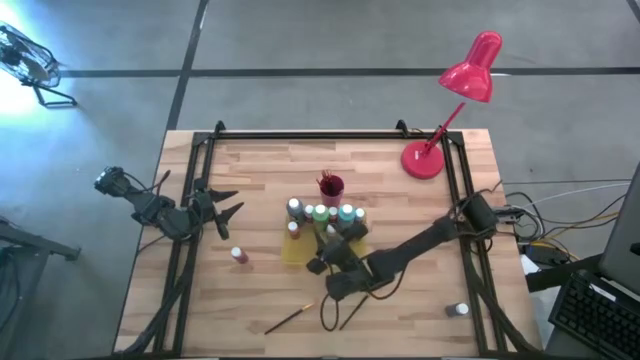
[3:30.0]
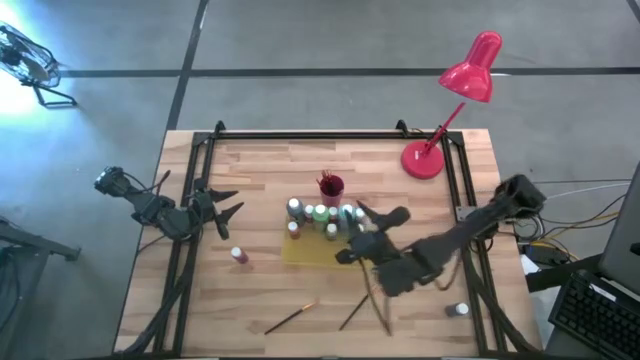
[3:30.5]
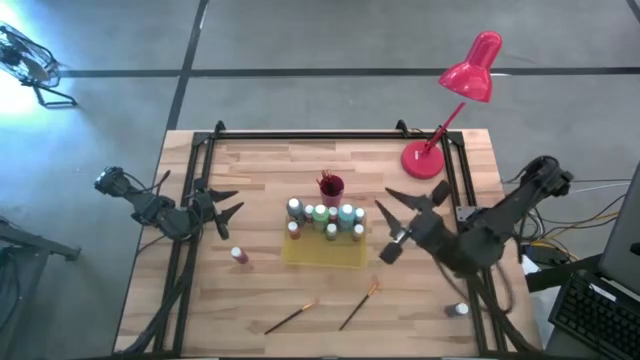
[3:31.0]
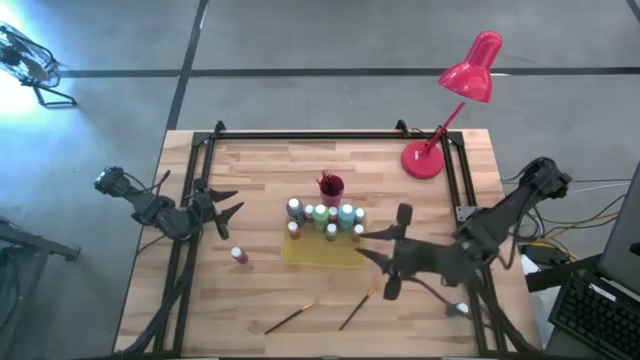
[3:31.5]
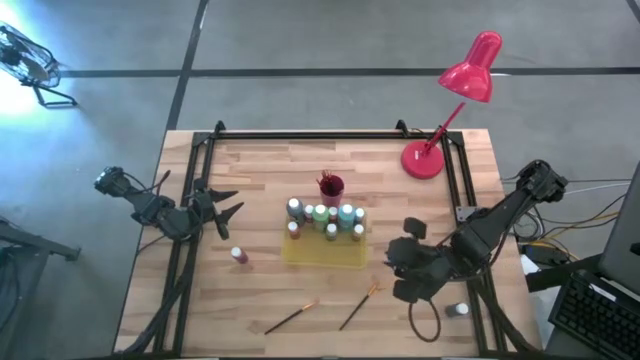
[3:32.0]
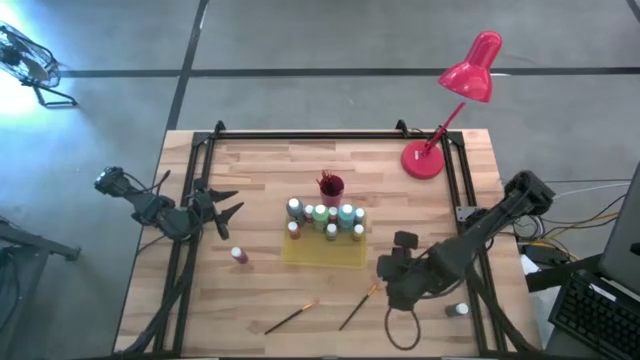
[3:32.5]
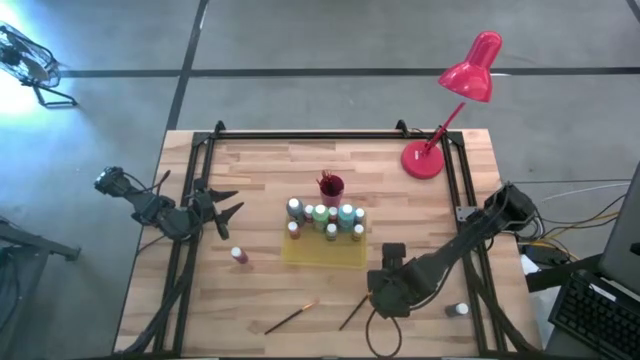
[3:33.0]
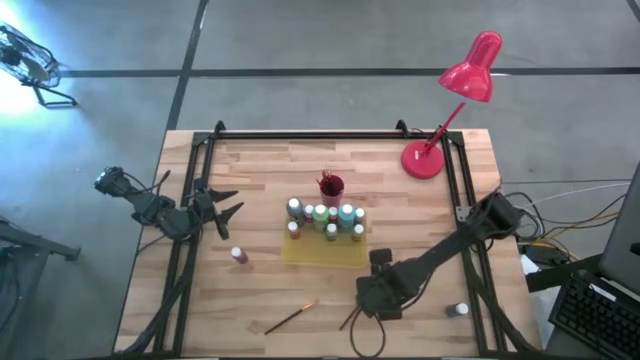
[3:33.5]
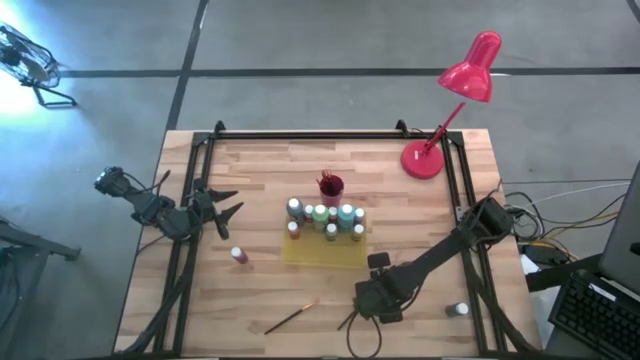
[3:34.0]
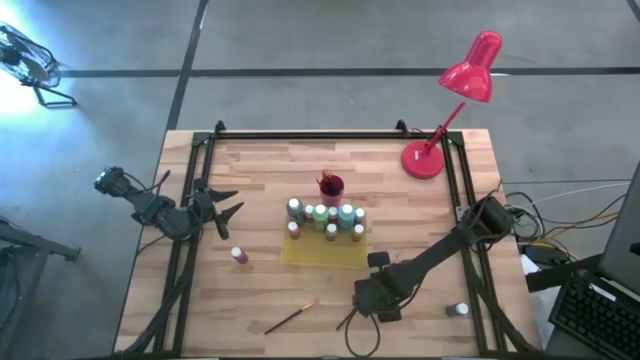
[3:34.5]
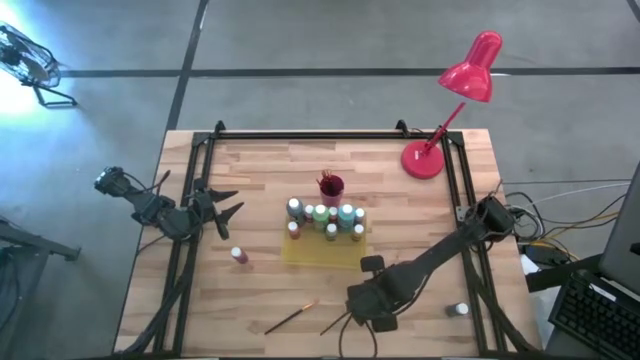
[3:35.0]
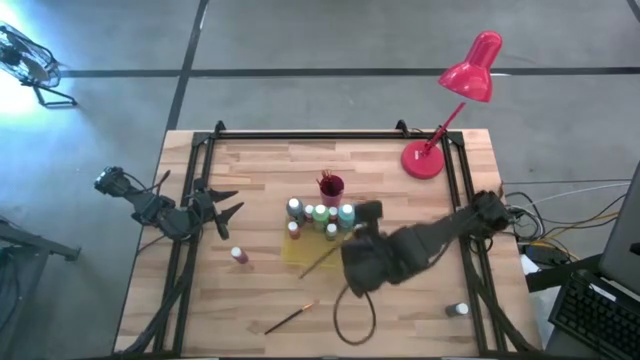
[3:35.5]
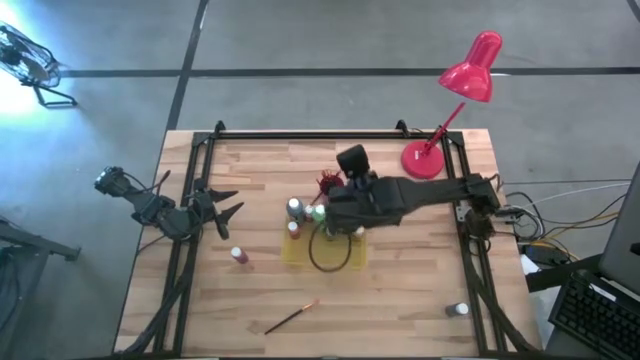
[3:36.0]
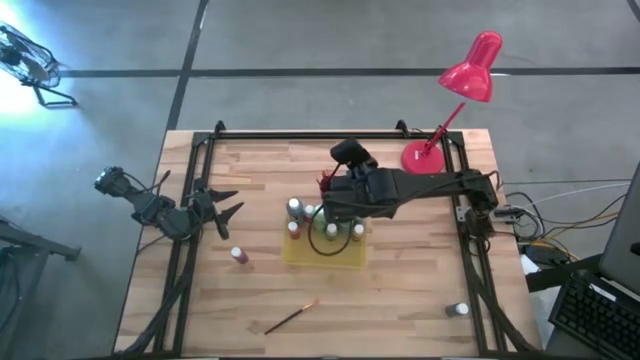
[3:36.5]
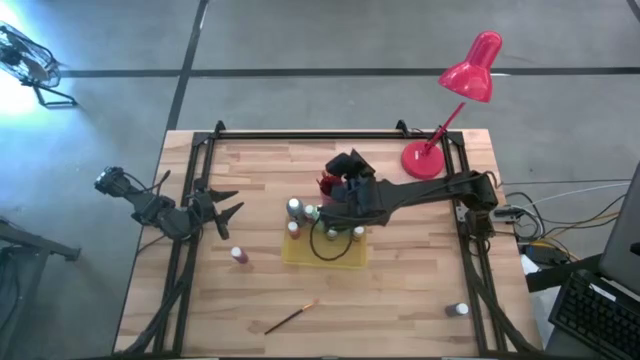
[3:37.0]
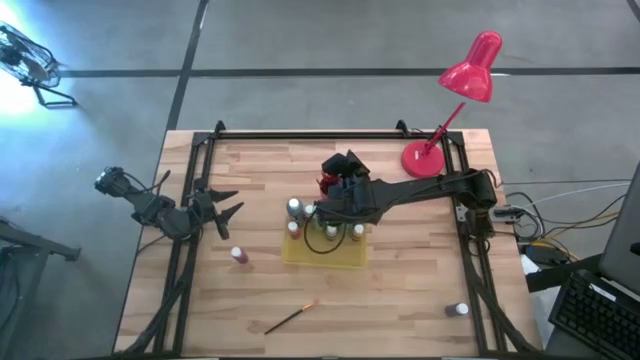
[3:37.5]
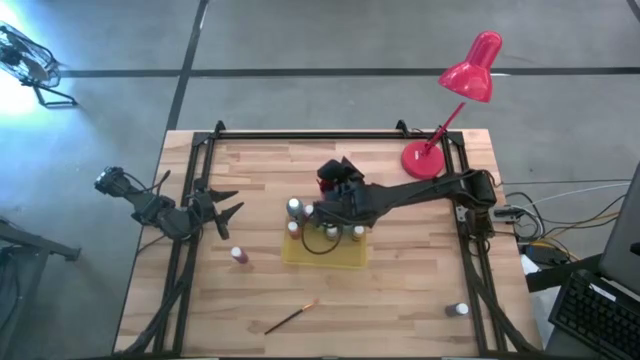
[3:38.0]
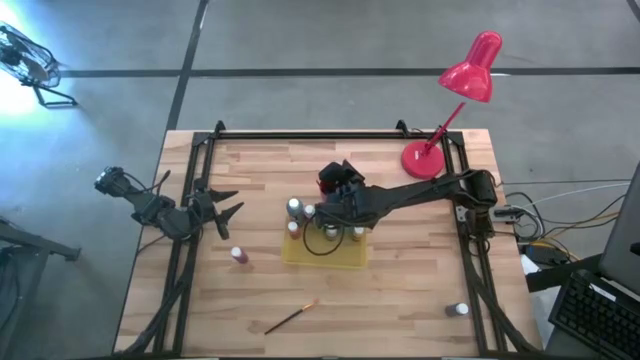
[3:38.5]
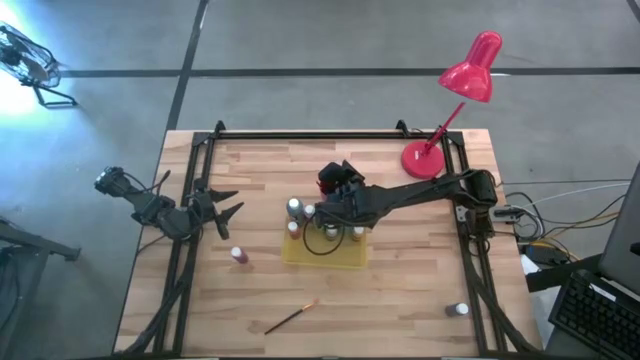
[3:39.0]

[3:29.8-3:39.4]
Task: Pick & Place Paint Supplies
Put the gold paint brush into the pink cup

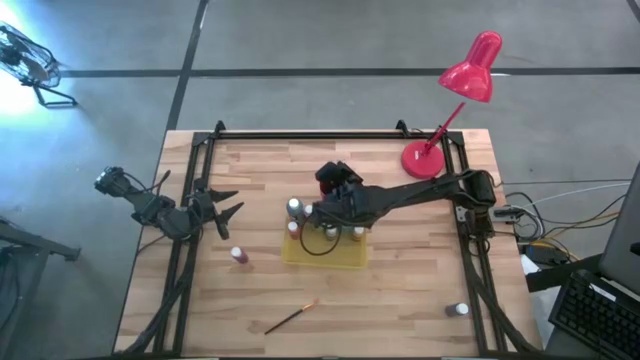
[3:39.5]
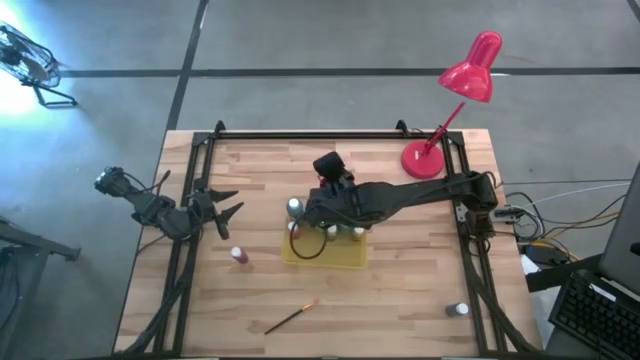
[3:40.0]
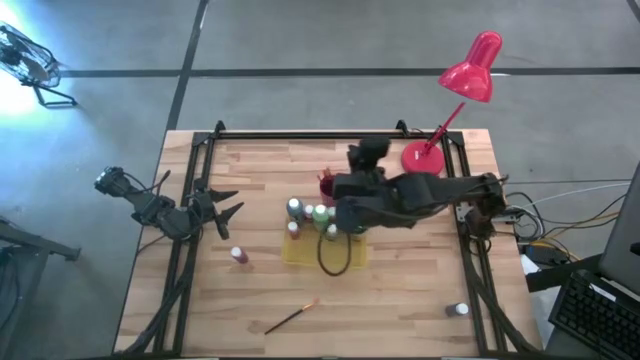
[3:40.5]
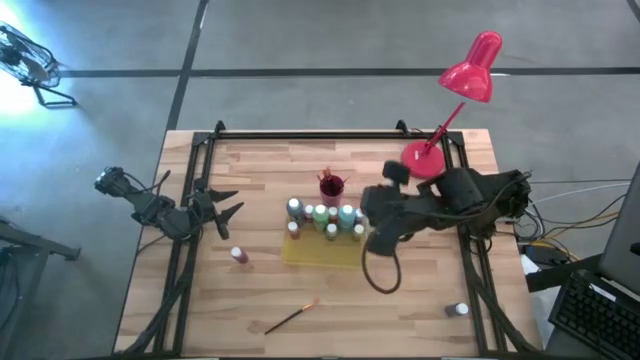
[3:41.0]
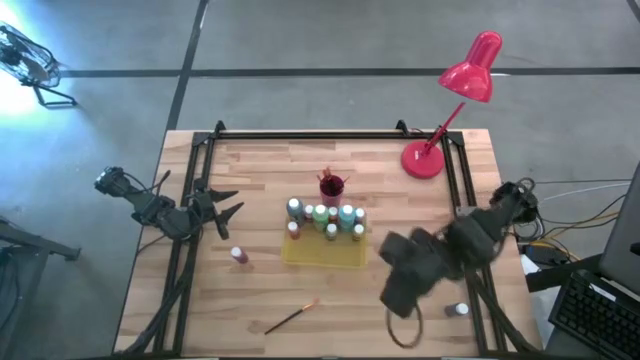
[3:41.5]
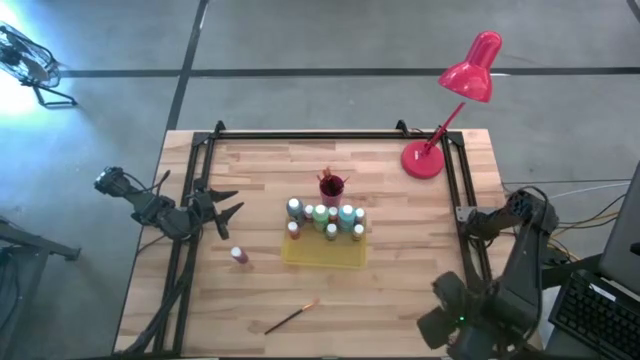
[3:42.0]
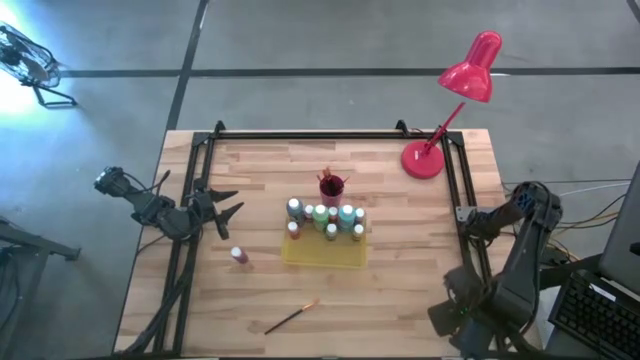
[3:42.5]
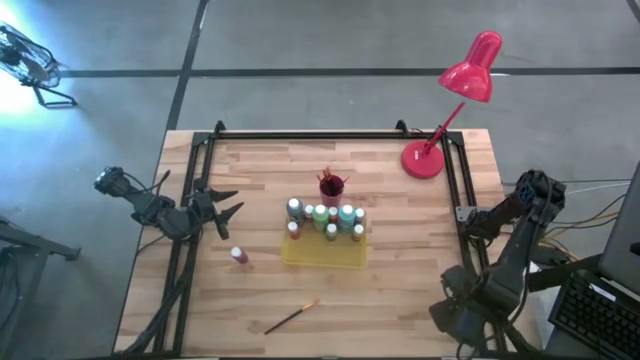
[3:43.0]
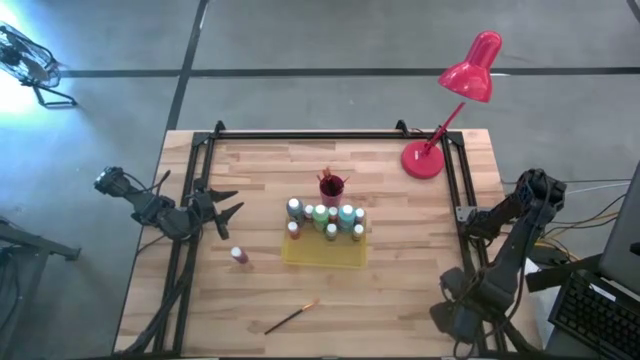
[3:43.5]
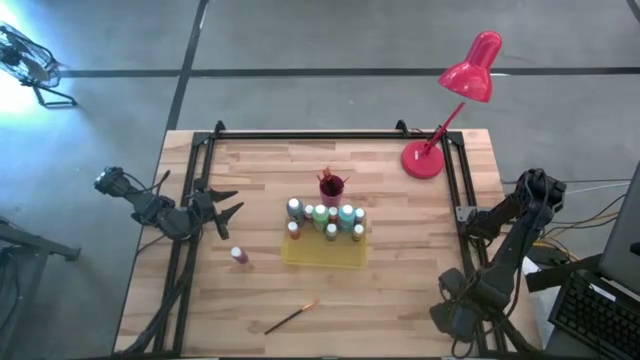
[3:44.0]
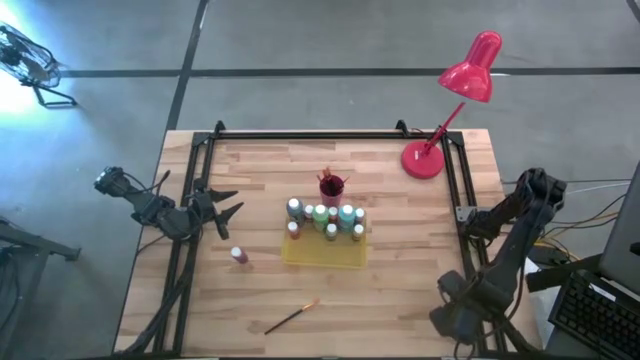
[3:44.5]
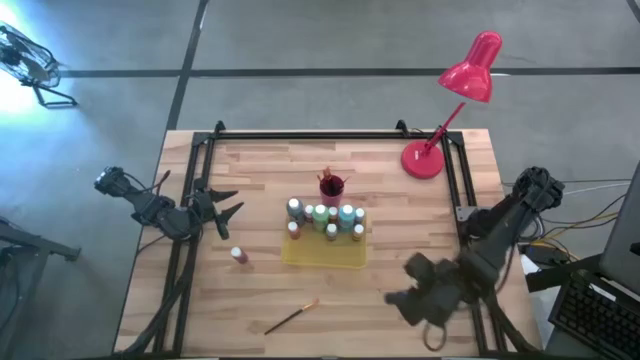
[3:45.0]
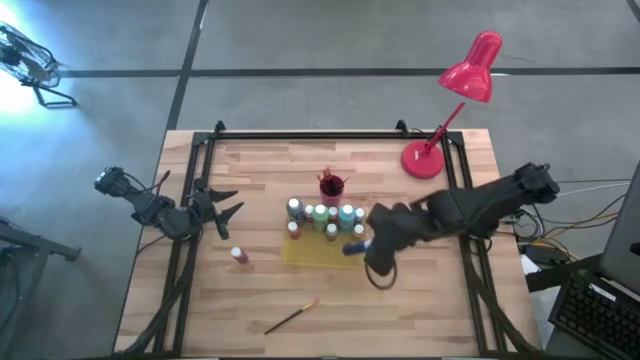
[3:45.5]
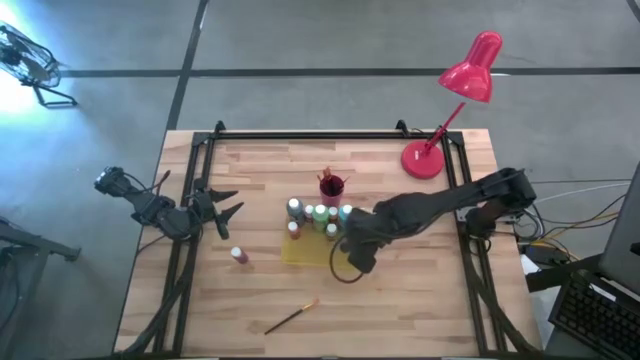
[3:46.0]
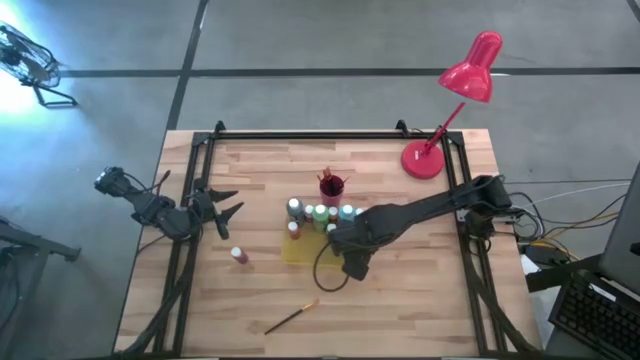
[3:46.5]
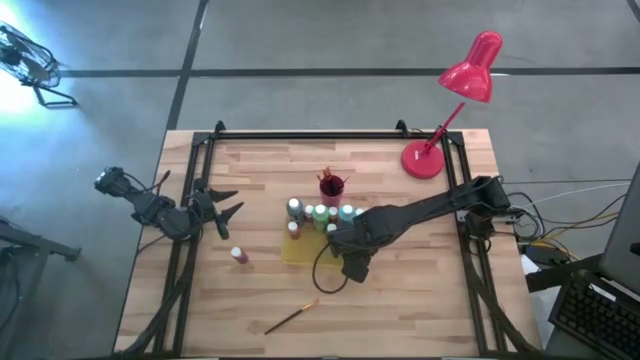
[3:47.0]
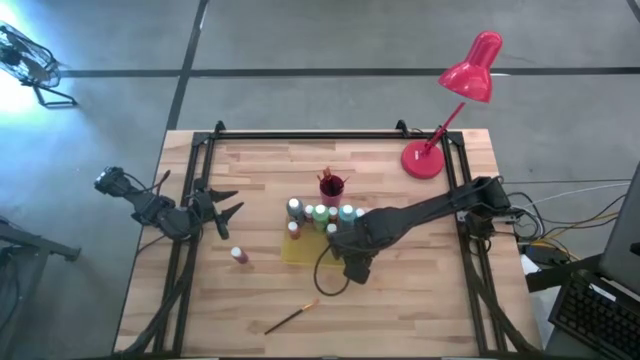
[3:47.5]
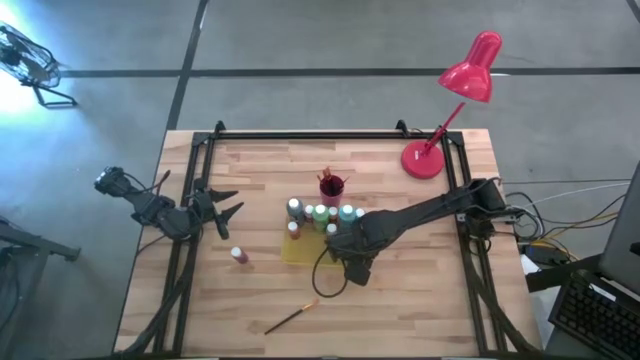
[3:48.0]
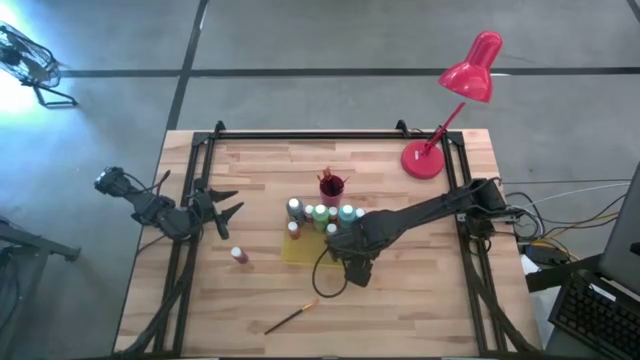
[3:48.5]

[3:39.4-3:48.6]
Put the small blue paint bottle into the yellow bin

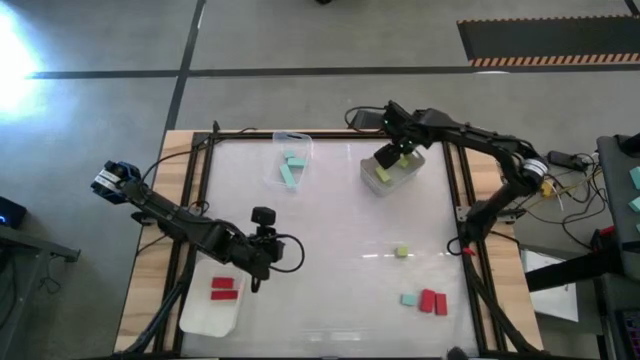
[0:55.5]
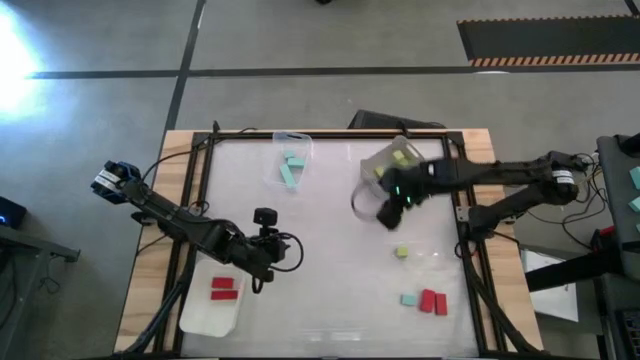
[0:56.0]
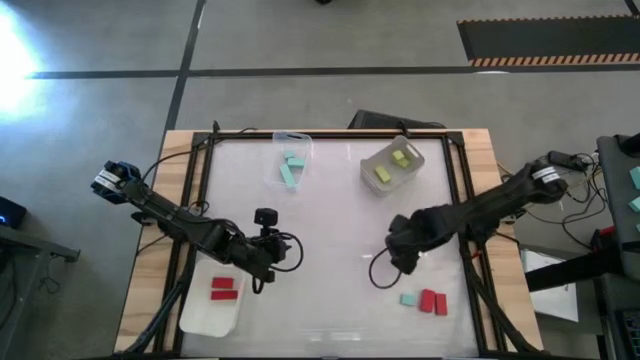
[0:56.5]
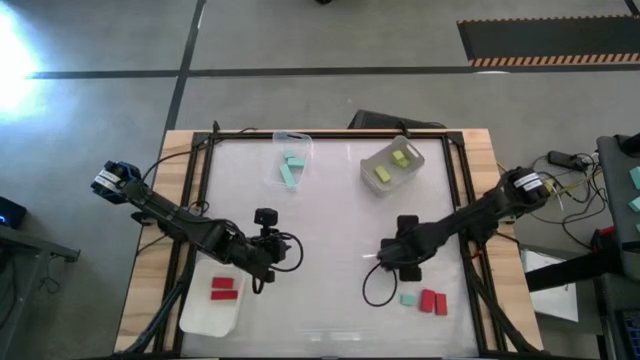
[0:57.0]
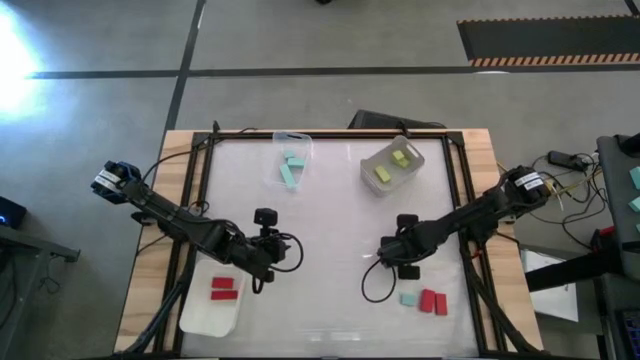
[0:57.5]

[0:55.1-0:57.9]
Task: Sort & place blocks by color
Put the green block into the gray bin

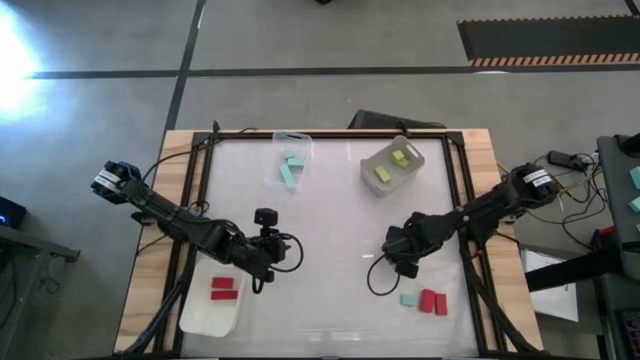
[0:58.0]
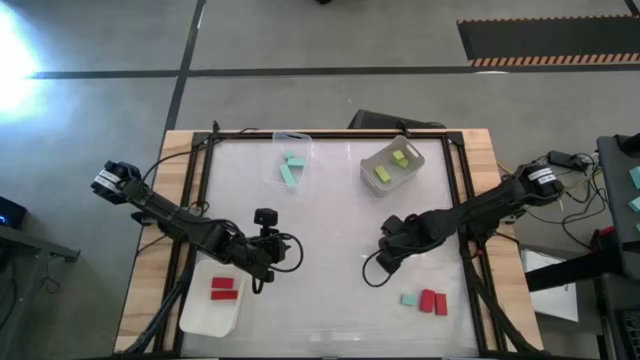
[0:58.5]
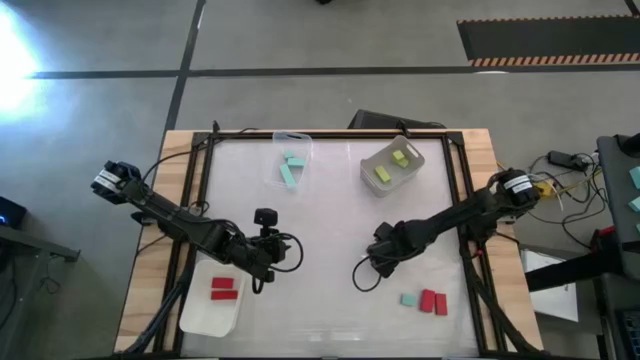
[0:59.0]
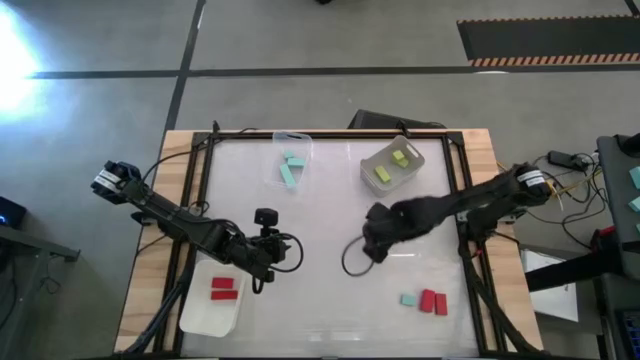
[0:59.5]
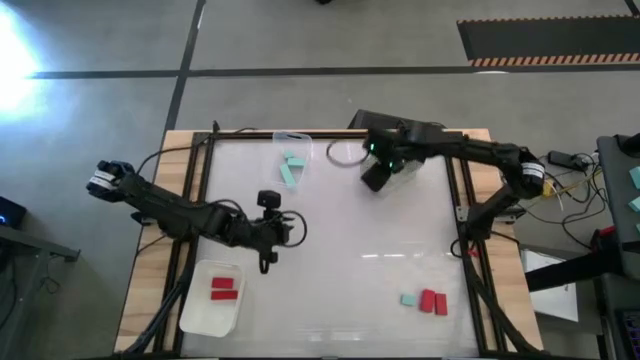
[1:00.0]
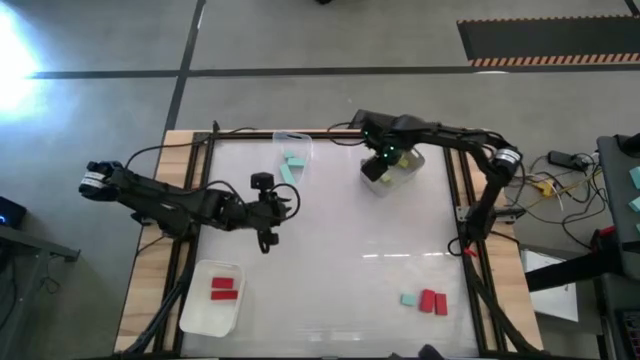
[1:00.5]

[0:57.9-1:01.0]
Put the green block into the gray bin
